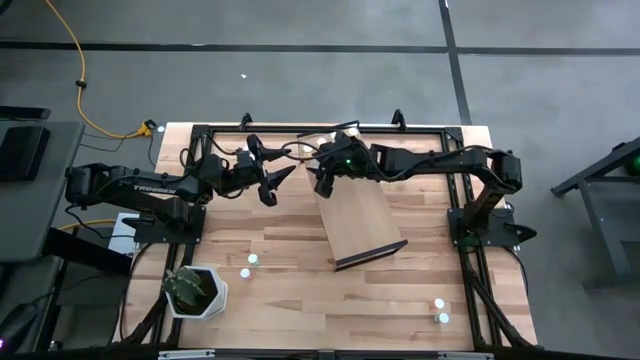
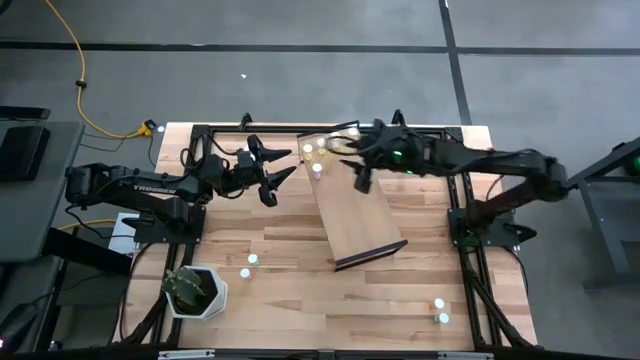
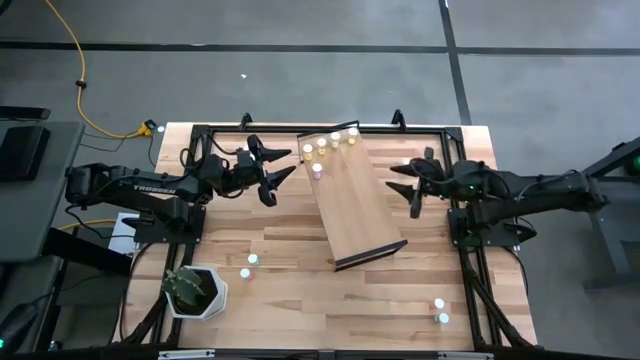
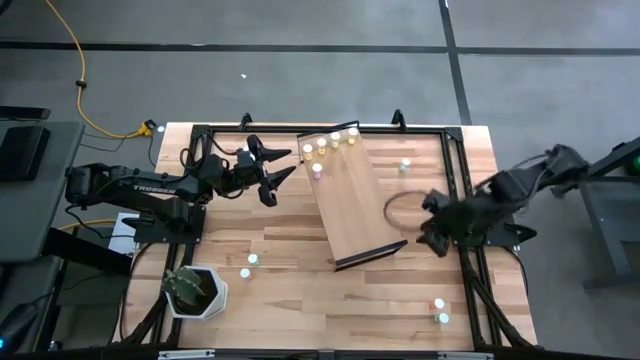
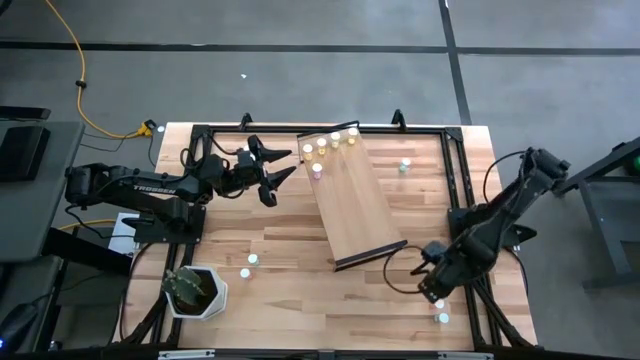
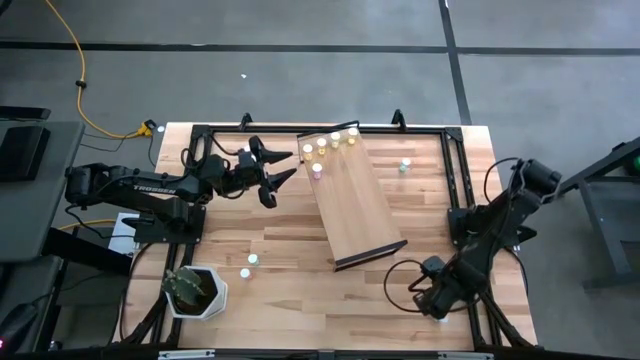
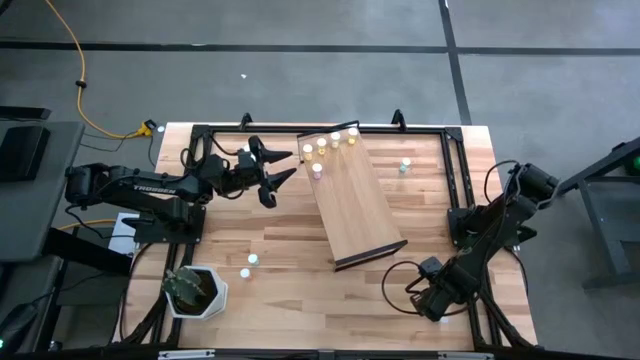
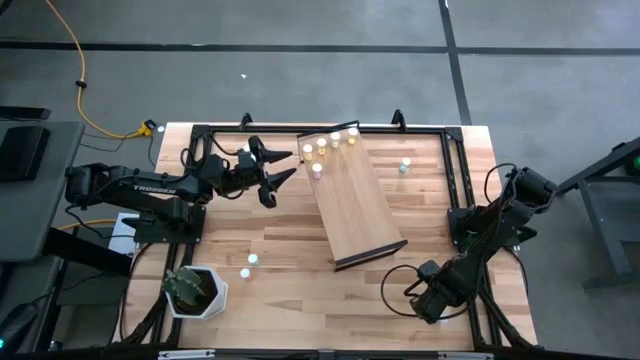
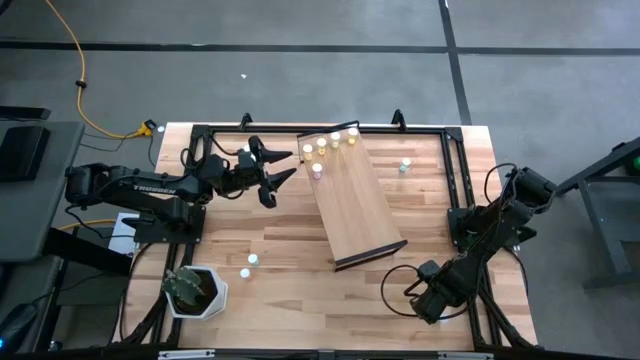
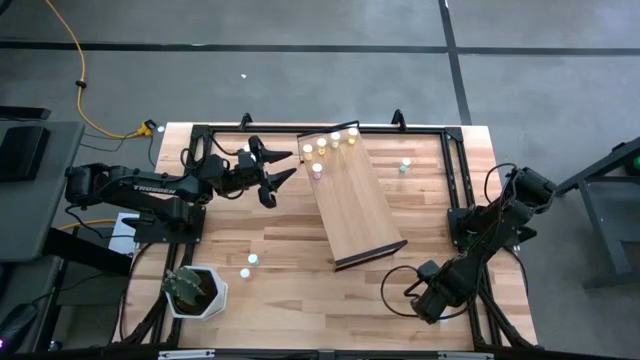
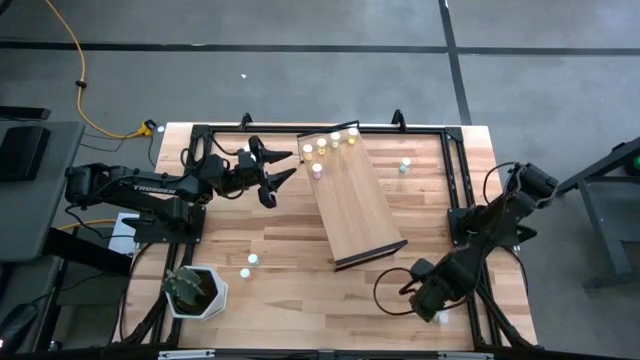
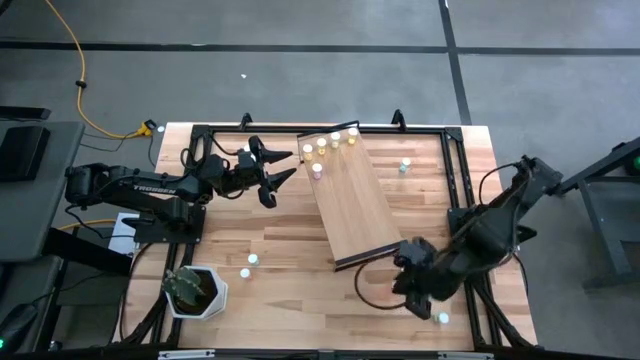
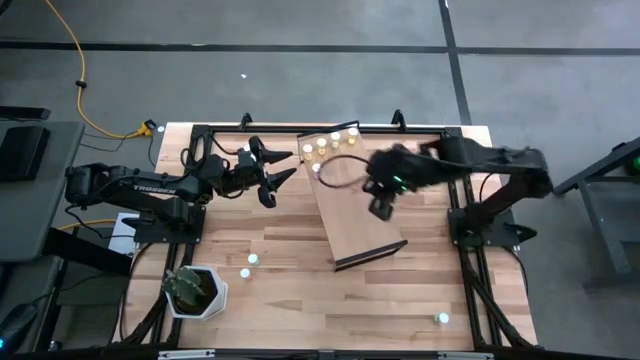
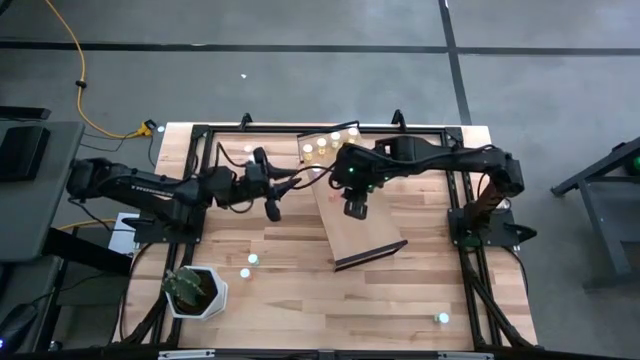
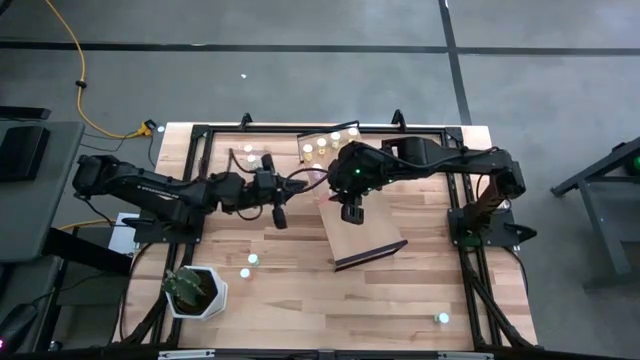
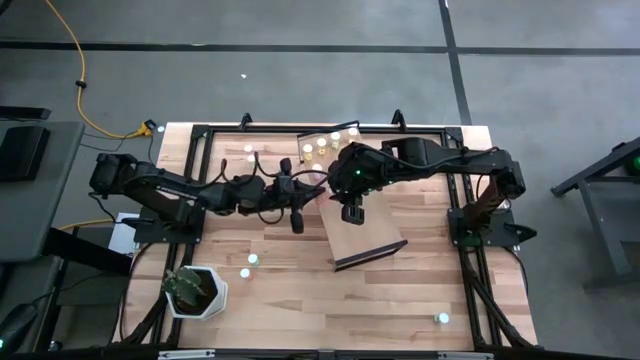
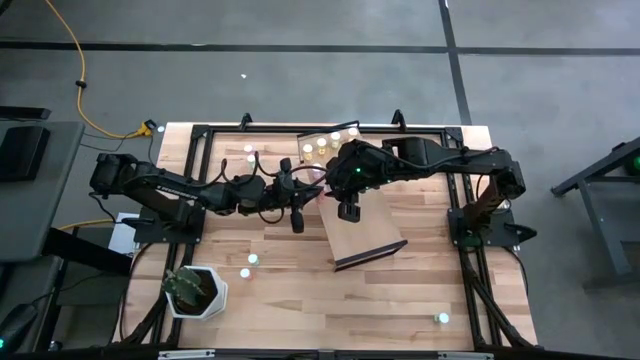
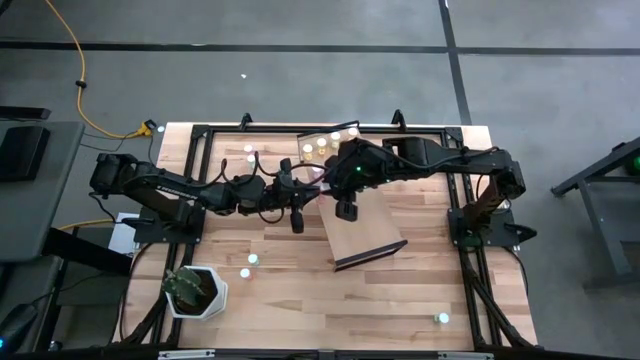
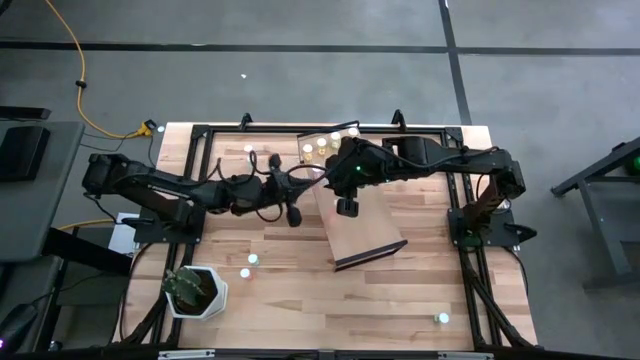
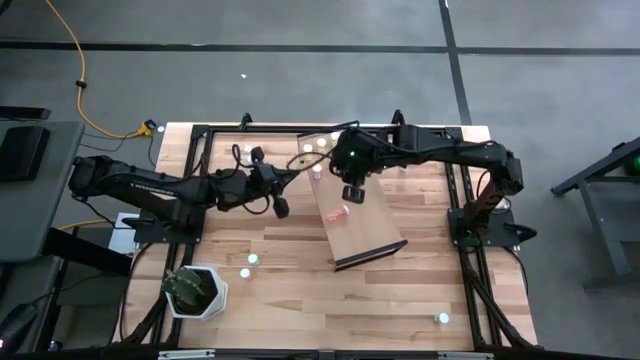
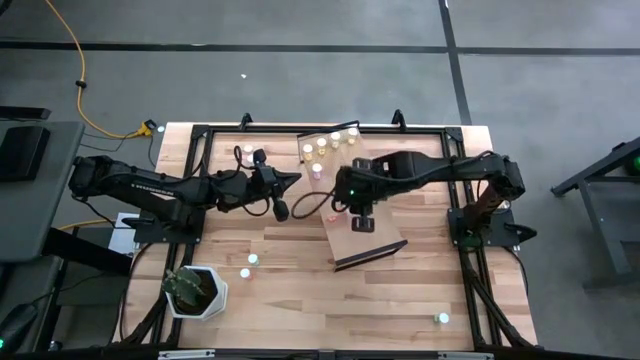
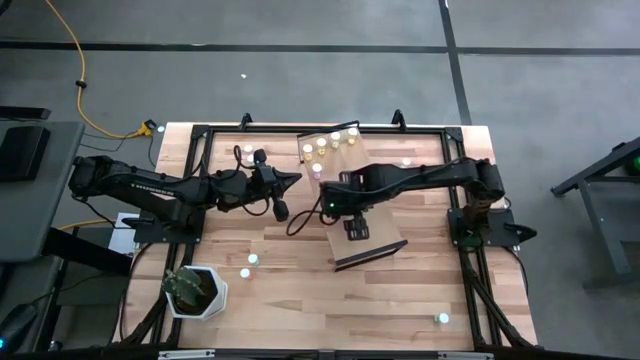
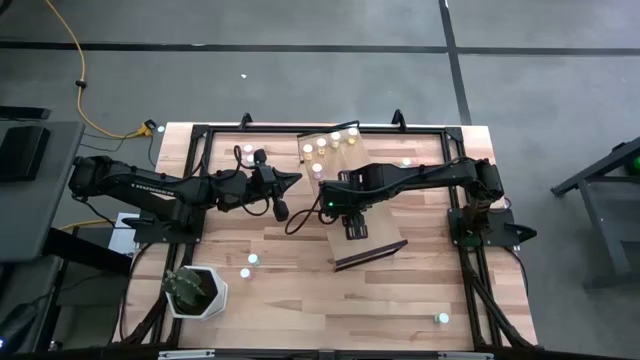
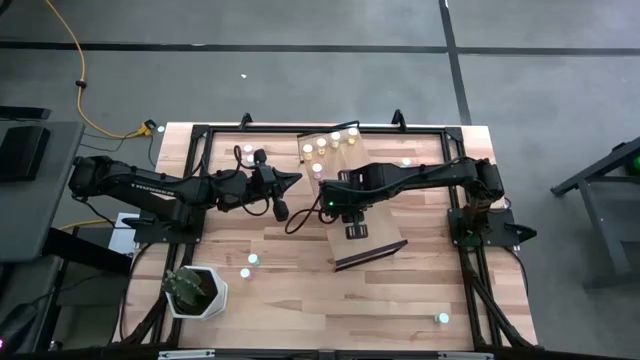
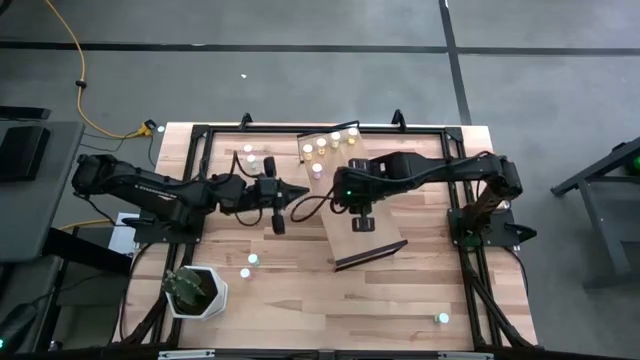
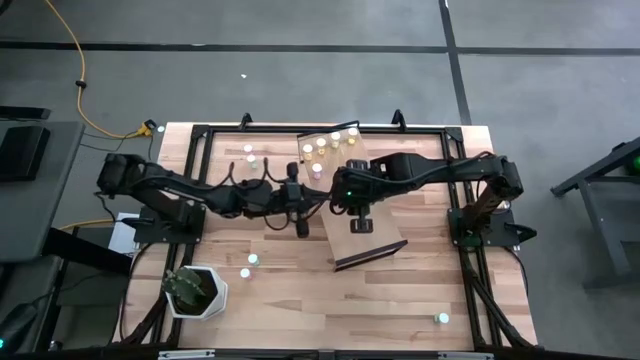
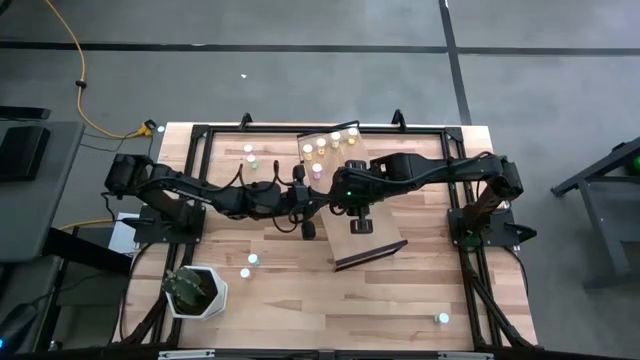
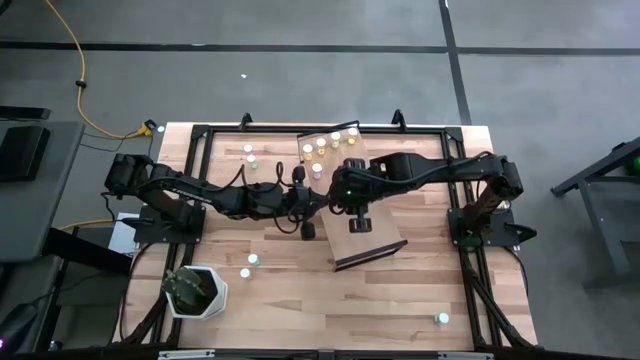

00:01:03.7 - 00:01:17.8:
Task: Pick and place medicine bottles onto shelf by color
Put the pink pill bottle on the shelf

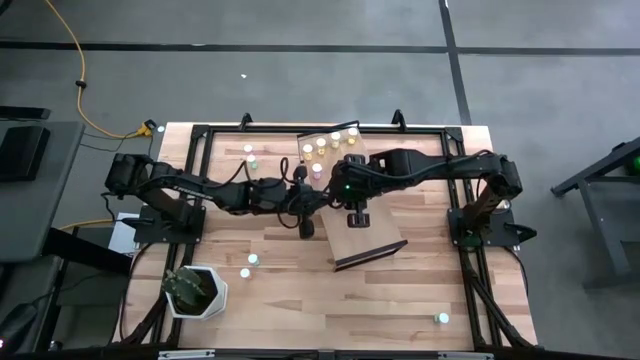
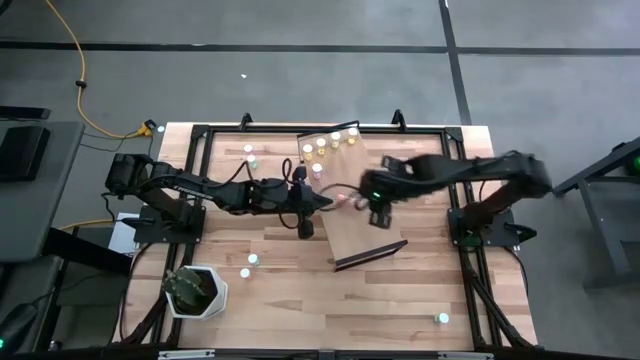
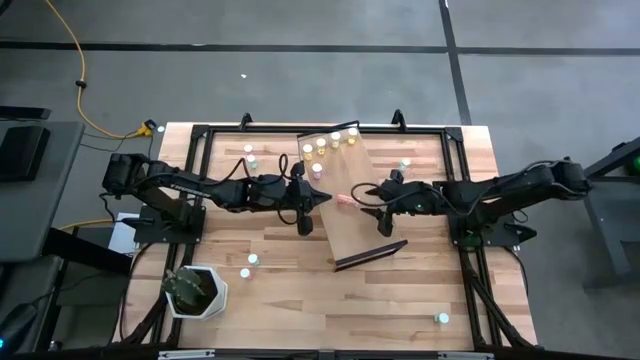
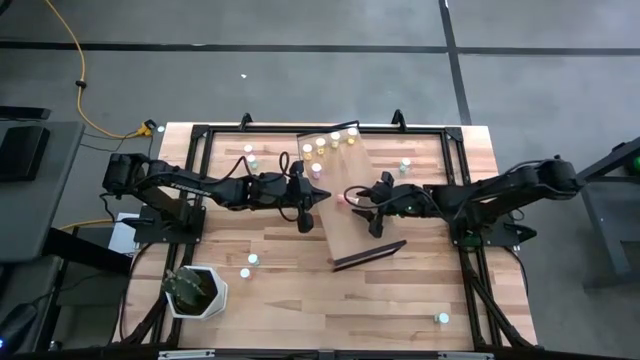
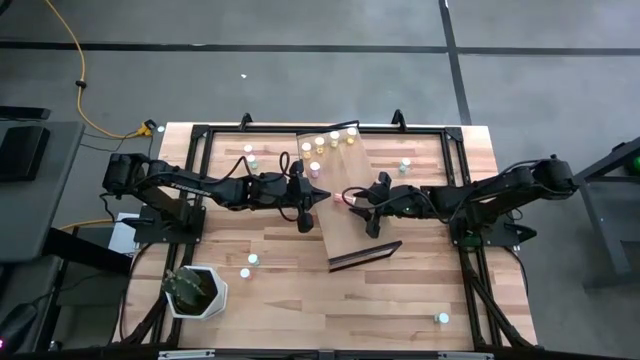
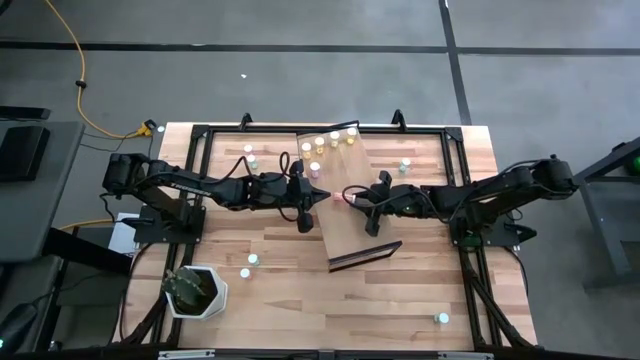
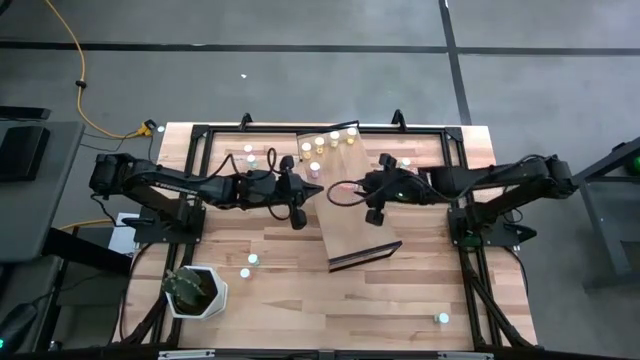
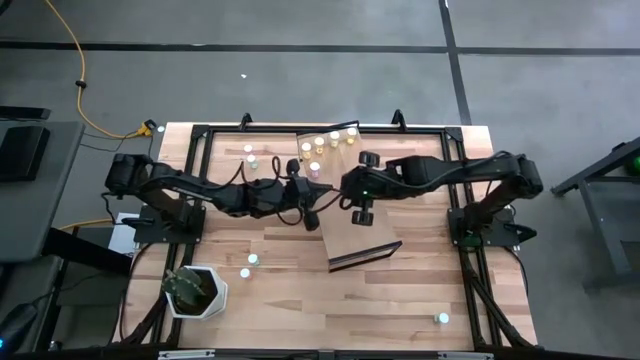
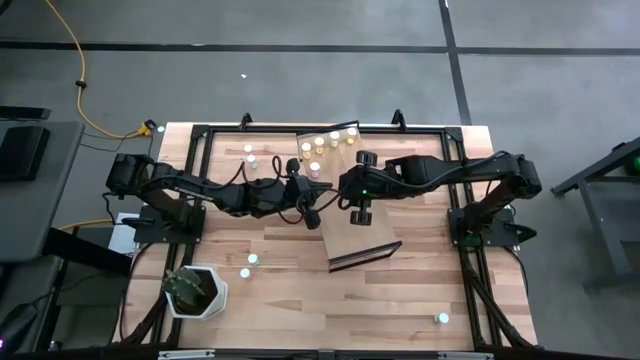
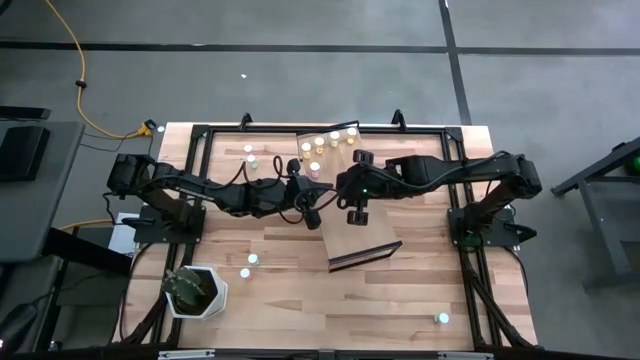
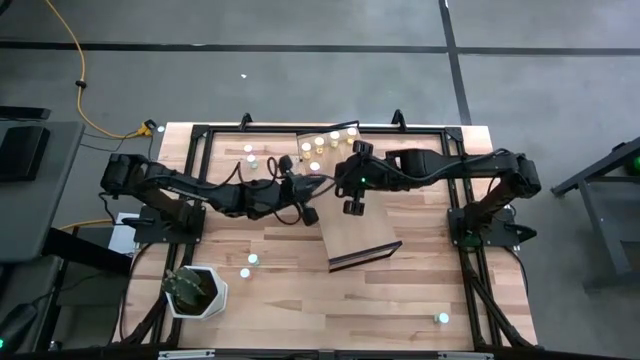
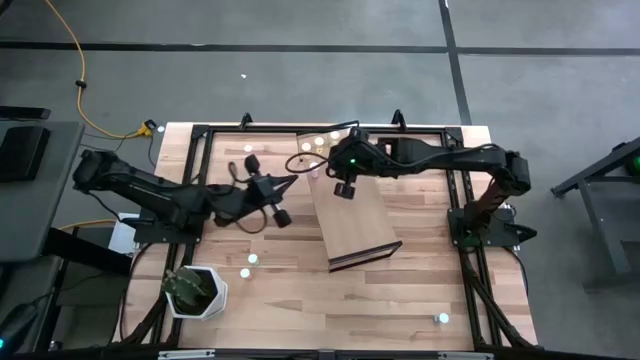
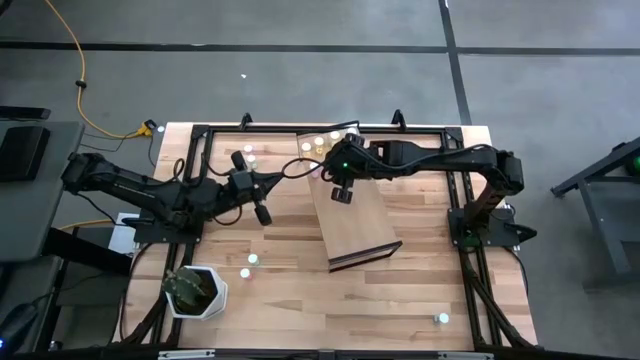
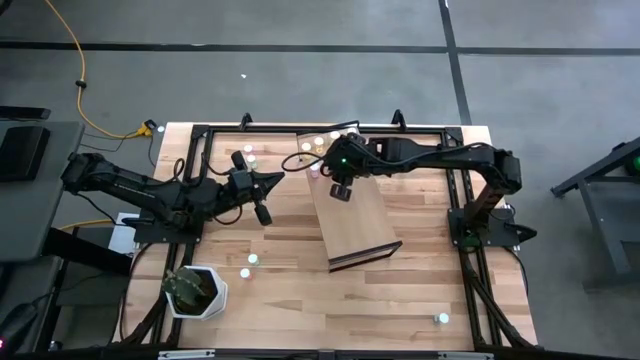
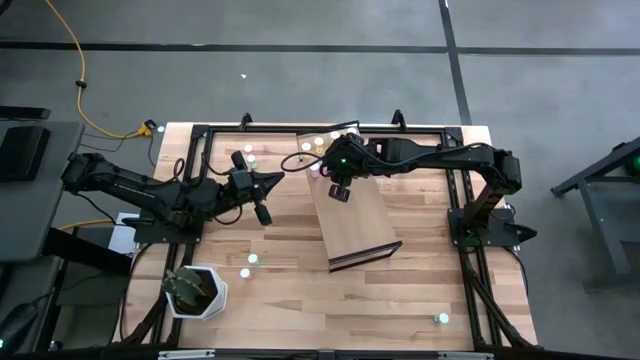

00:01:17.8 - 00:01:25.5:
Put the pink pill bottle on the shelf
